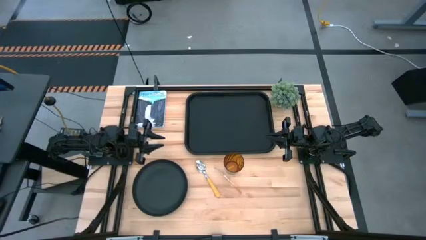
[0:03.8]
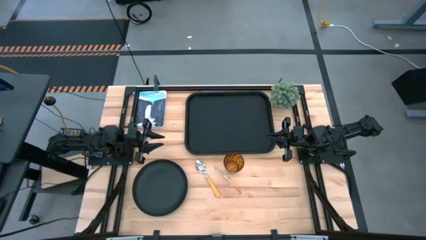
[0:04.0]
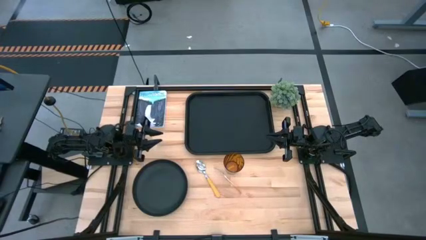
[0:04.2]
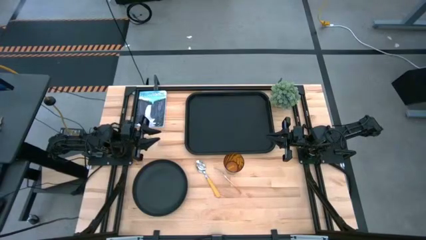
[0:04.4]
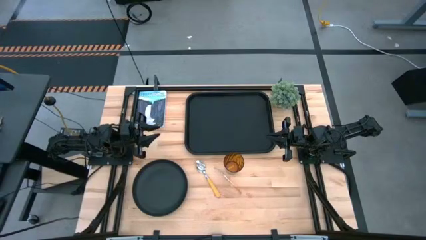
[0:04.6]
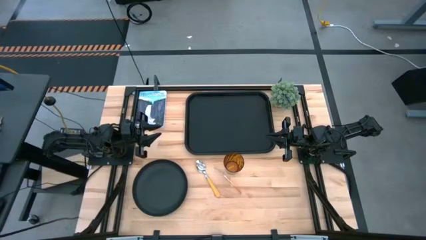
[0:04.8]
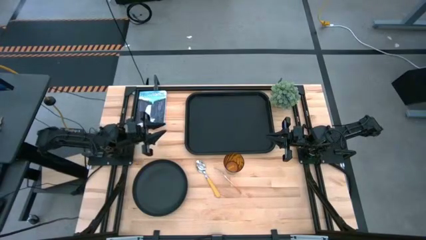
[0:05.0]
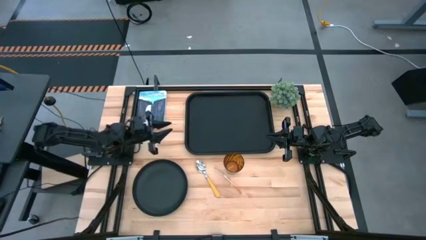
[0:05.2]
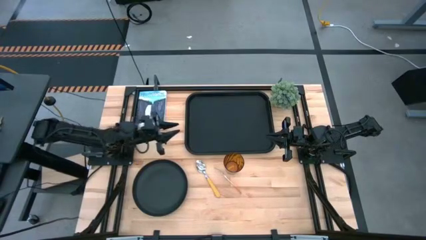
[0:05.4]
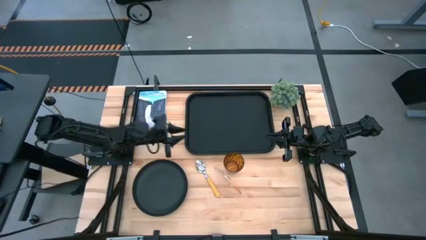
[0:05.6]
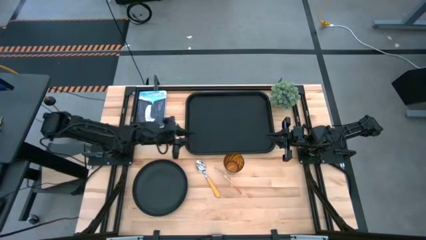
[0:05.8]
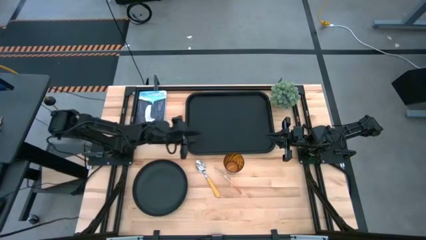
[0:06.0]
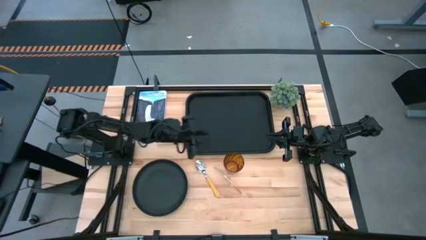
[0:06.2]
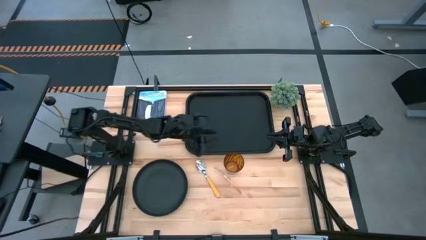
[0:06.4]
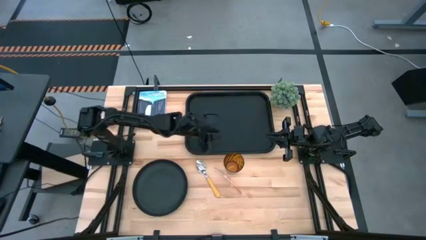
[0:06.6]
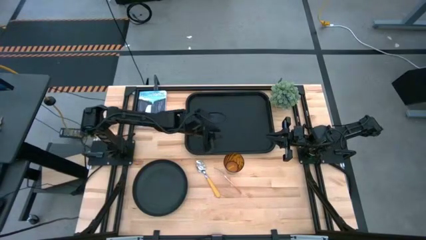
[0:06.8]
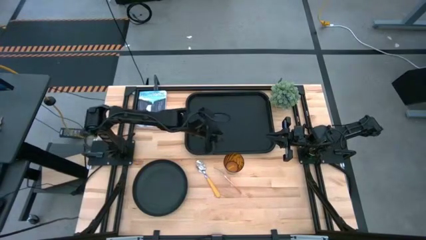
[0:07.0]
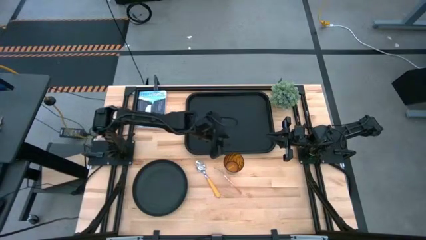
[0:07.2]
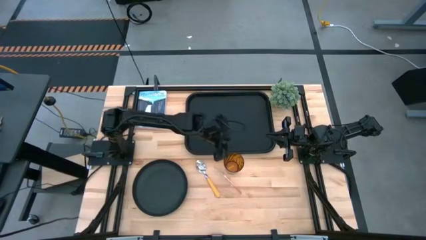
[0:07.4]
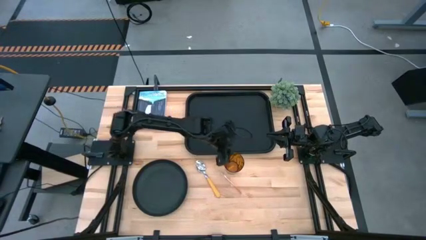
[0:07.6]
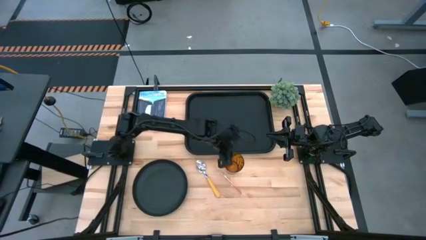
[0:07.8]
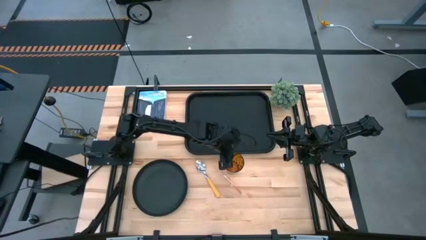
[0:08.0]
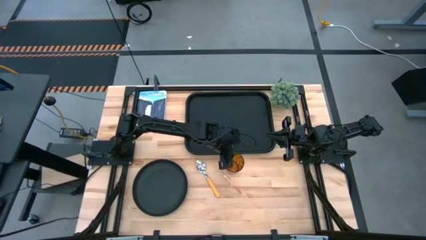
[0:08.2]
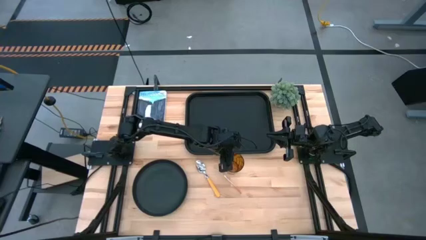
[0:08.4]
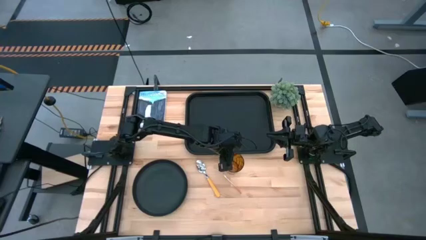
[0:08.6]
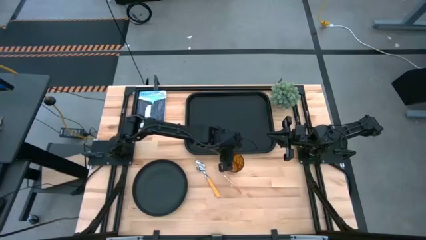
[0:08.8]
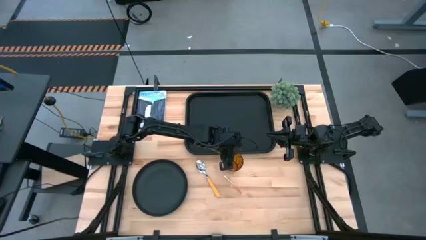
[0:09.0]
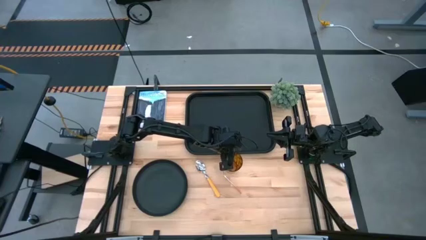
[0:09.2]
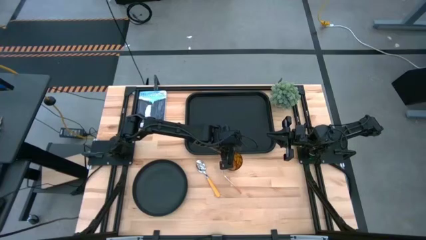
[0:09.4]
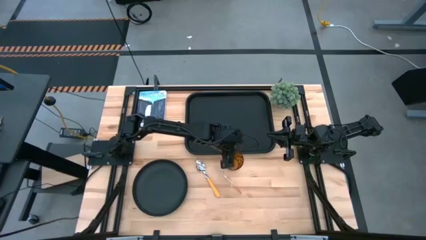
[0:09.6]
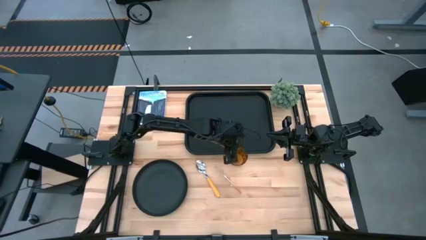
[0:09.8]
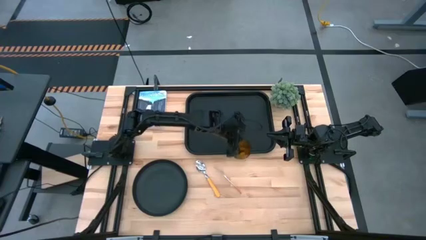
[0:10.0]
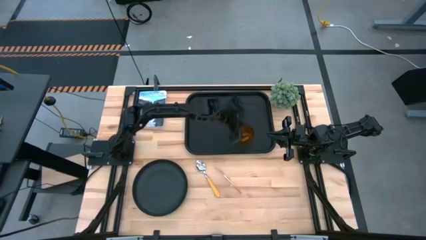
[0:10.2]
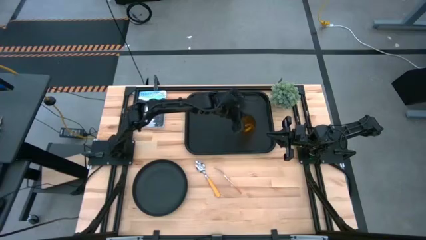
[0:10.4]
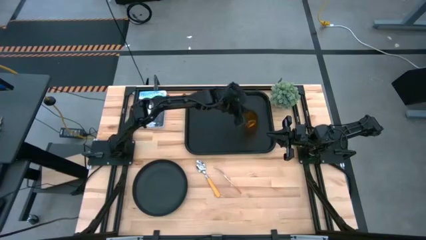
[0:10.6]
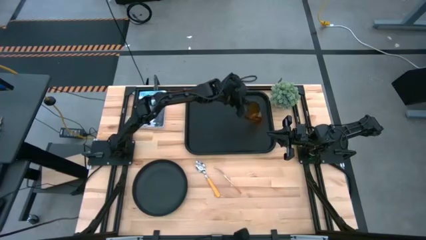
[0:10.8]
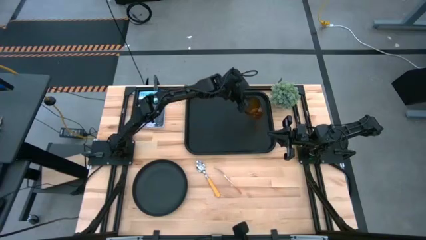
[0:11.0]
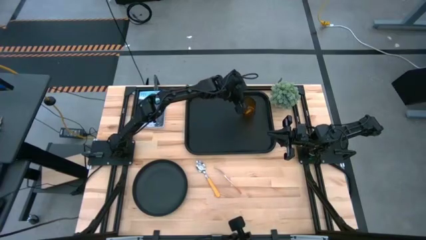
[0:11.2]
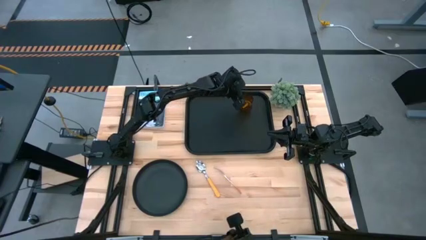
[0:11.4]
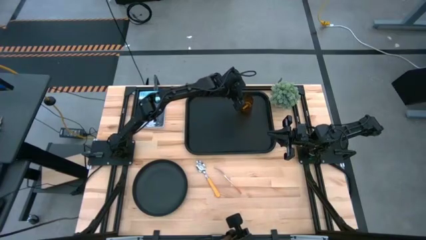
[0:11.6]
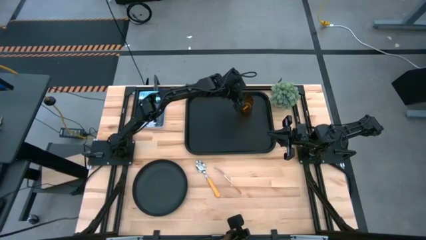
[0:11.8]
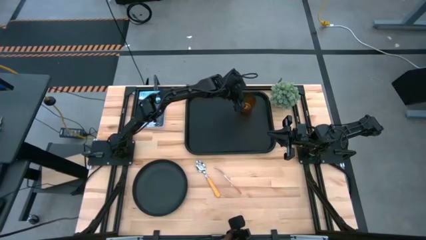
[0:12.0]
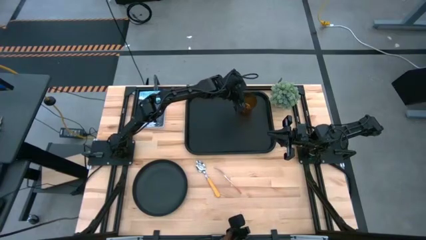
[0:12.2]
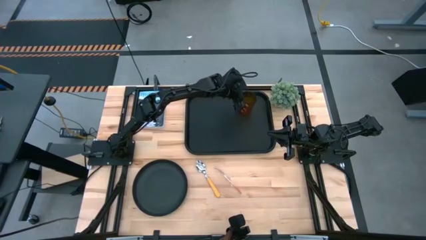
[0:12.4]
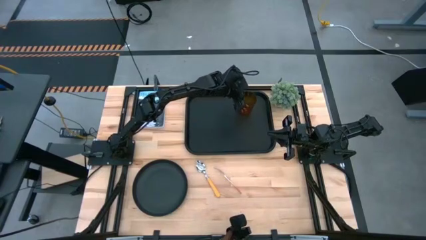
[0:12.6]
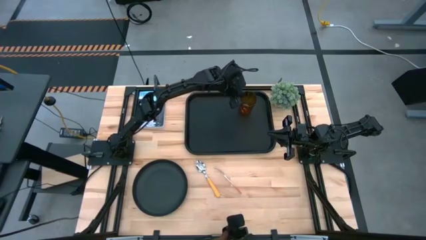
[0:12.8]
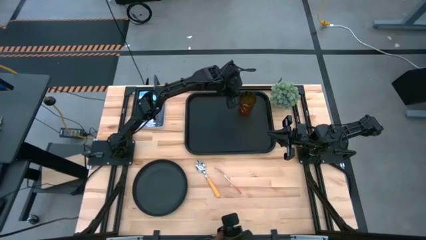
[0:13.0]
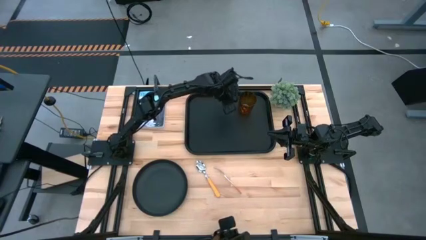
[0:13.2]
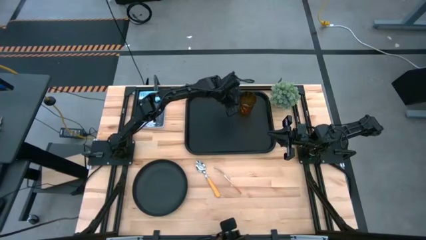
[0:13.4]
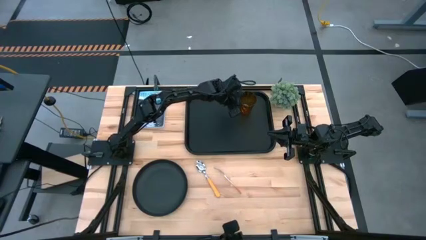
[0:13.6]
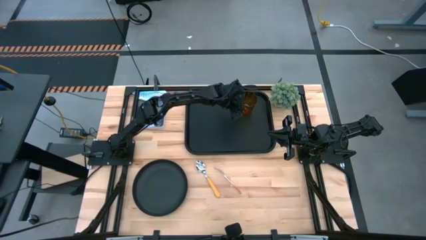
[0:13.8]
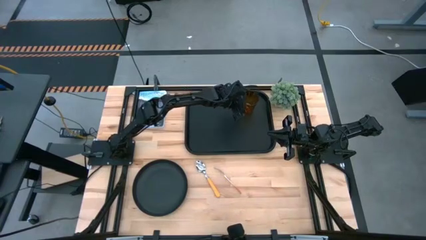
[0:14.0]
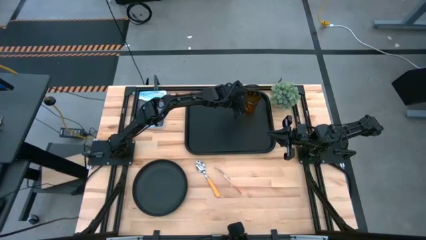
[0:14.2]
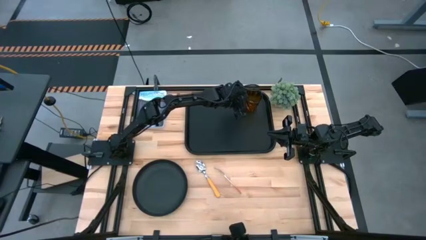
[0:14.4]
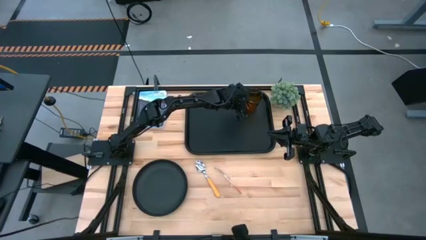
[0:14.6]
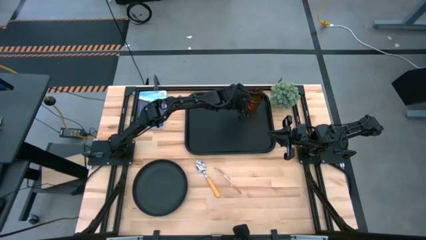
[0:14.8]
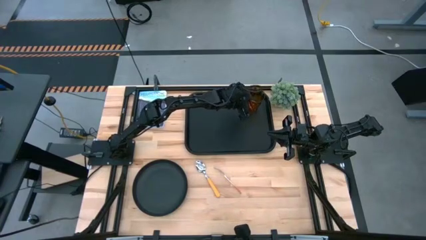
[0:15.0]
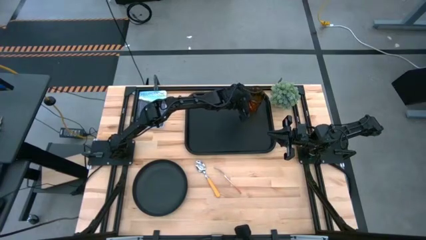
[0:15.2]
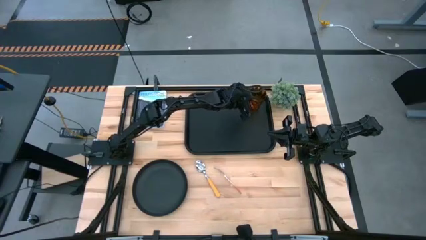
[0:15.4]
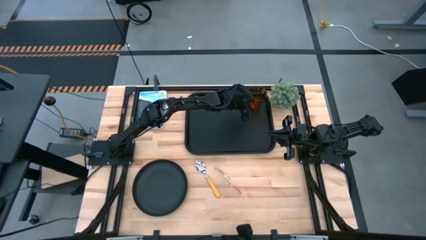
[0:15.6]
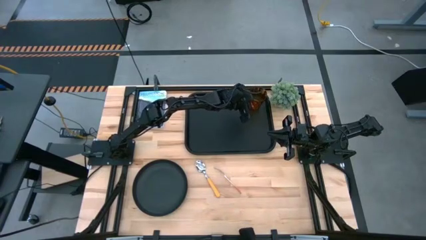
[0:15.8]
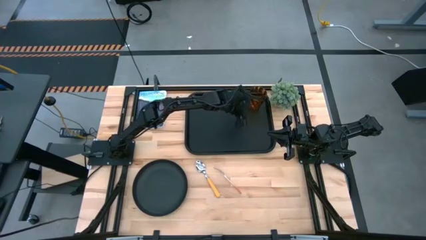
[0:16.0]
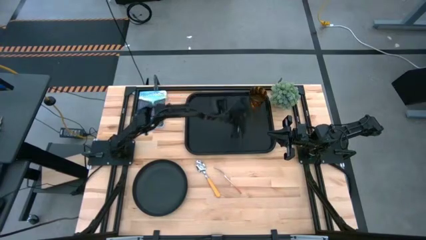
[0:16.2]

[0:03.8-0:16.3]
Task: Pick and place plate/cup/fork/spoon on tray
Put the brown cup on the top right of the black tray
